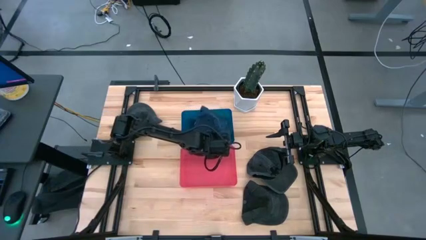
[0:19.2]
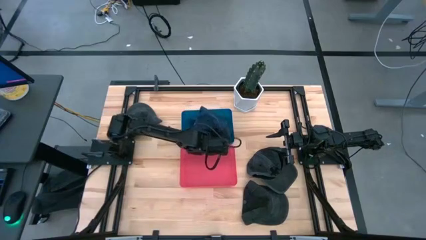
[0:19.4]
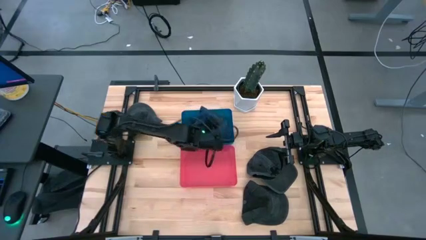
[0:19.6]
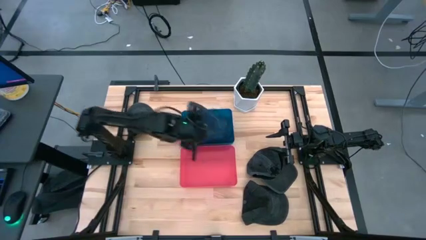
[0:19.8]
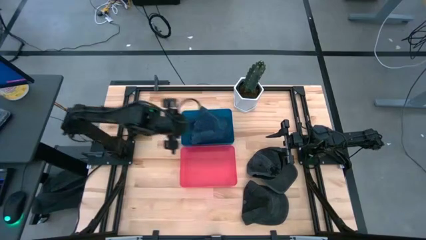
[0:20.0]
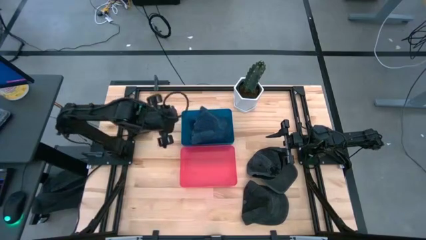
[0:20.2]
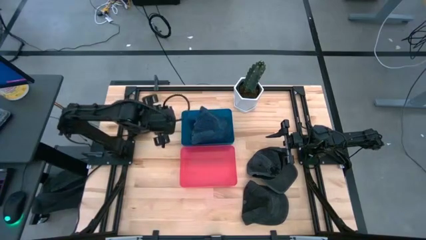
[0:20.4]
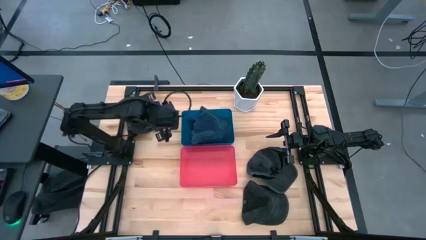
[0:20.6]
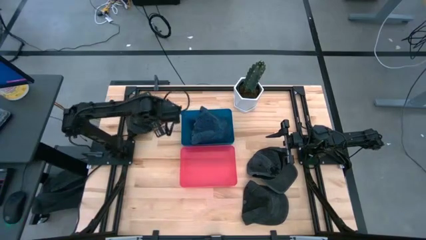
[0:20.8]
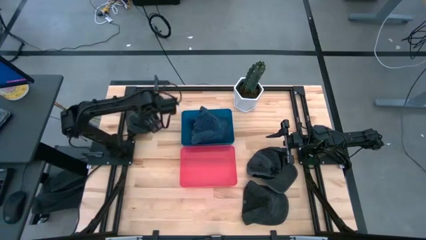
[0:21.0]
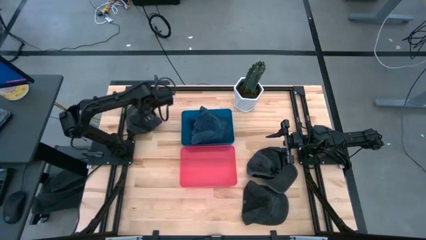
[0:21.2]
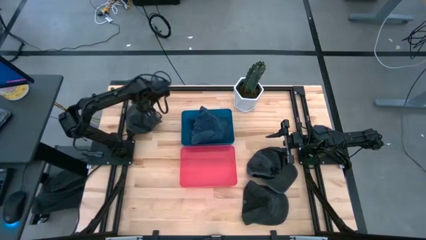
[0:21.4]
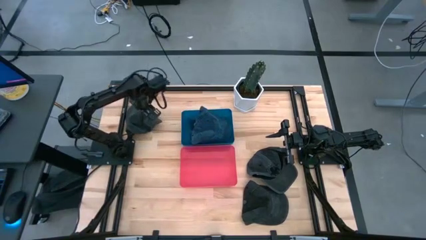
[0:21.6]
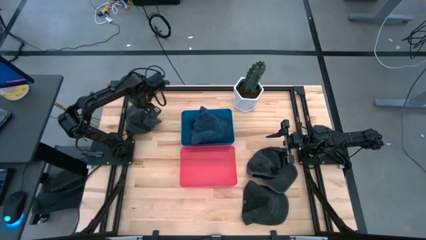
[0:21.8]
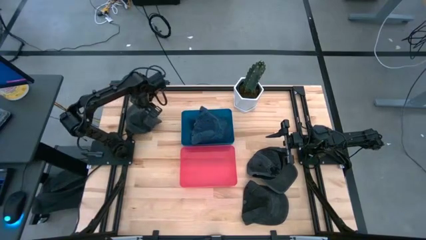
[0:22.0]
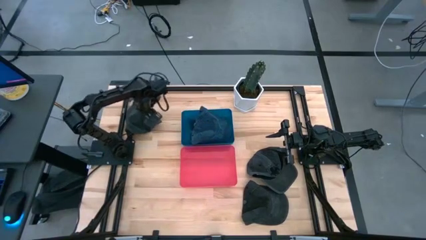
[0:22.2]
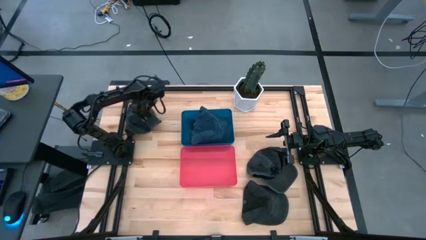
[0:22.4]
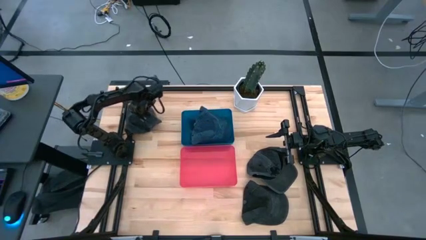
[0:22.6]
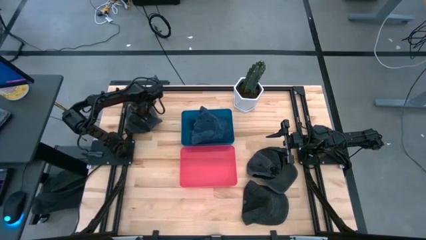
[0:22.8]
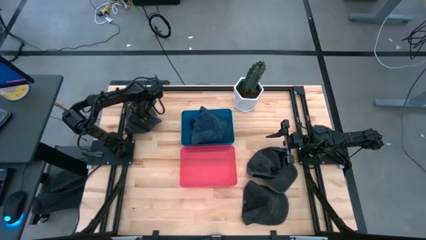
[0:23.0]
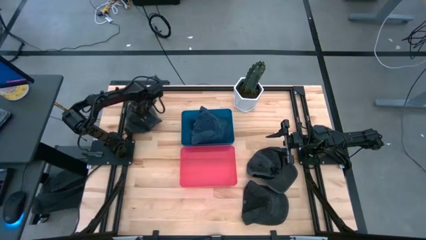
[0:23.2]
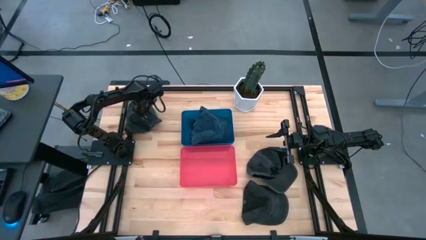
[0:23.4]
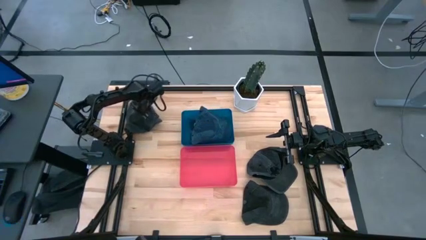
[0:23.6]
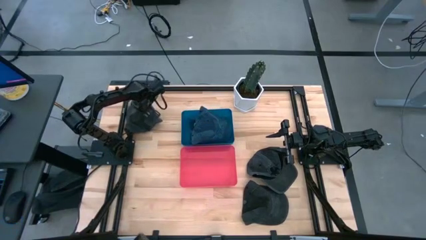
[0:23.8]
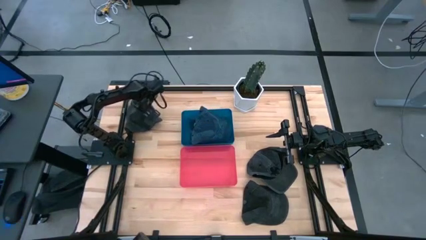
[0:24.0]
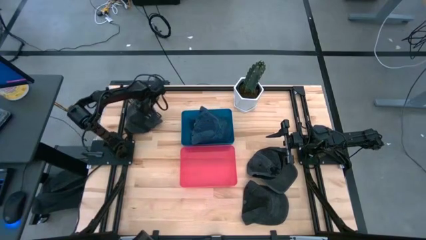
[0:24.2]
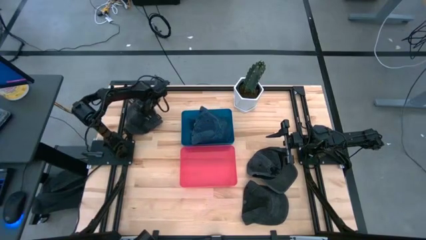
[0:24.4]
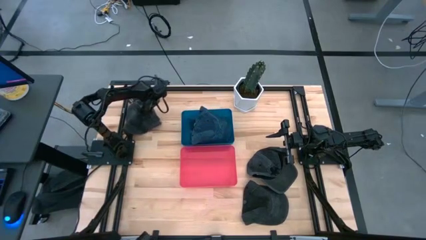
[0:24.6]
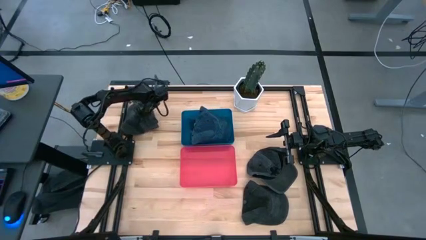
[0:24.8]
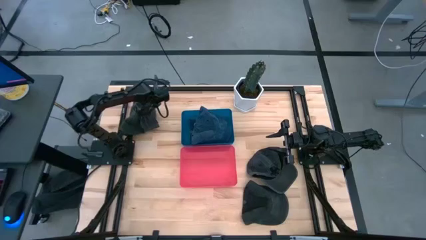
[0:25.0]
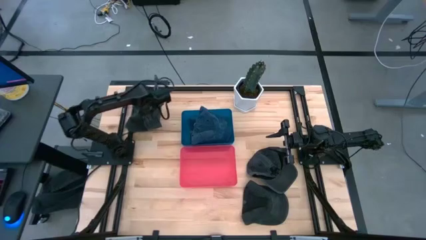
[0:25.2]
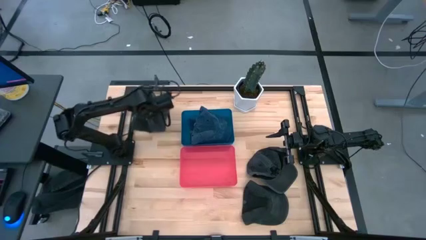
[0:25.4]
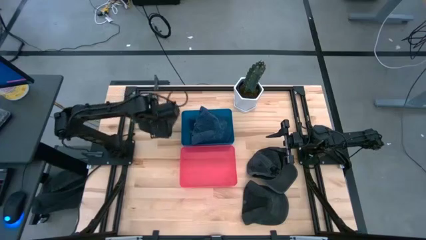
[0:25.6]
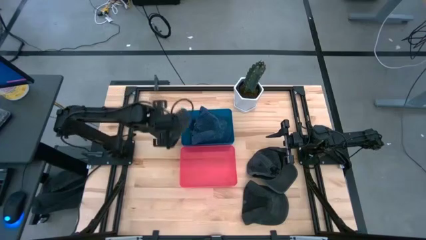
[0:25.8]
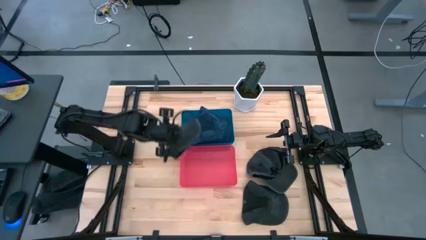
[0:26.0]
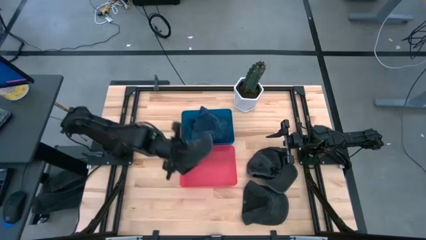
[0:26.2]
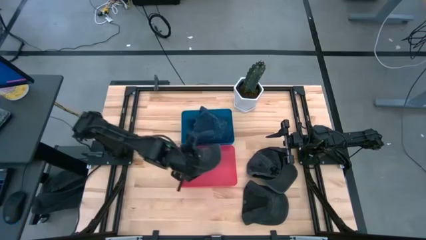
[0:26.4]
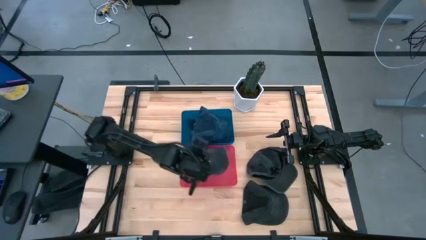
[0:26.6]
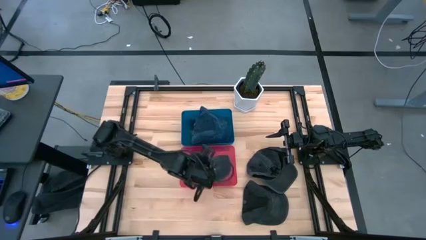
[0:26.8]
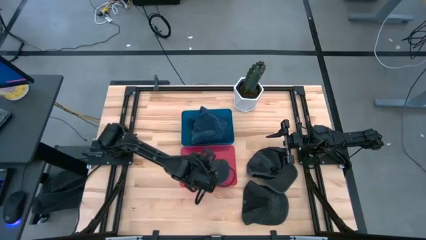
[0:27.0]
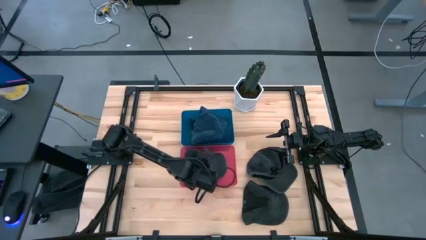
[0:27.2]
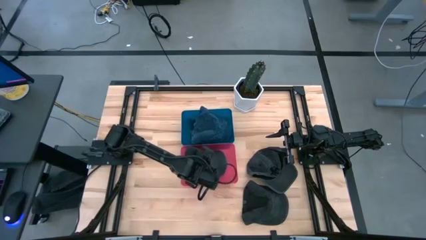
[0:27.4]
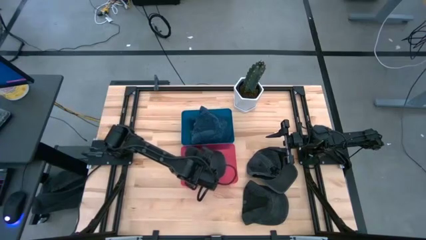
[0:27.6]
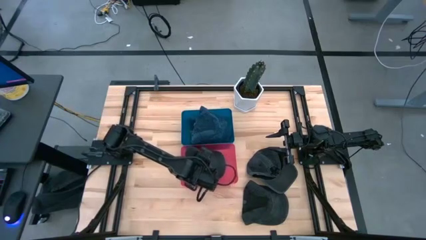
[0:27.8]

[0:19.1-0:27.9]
Task: Pick & Place hat
Put the top black cap into the pink bin

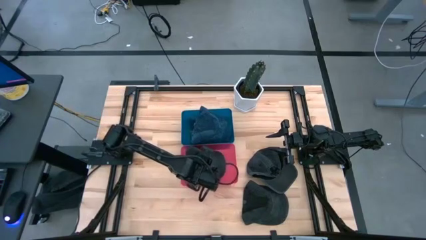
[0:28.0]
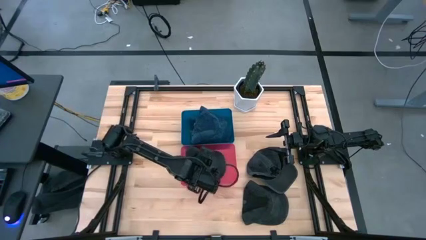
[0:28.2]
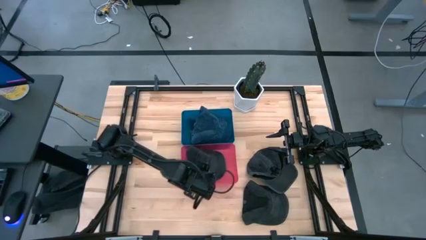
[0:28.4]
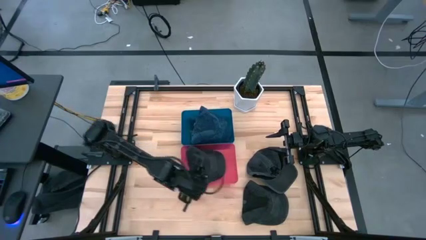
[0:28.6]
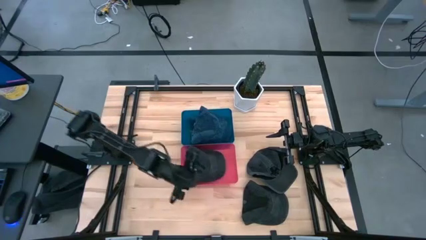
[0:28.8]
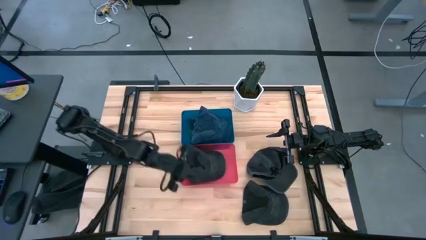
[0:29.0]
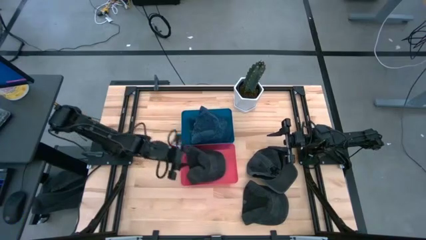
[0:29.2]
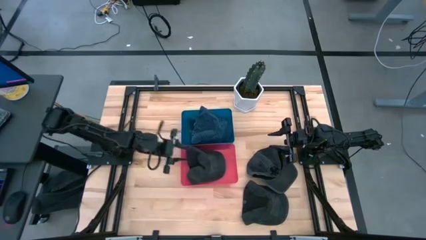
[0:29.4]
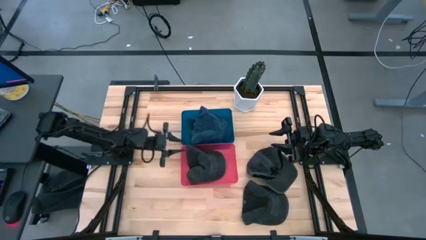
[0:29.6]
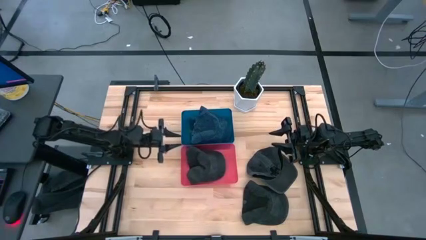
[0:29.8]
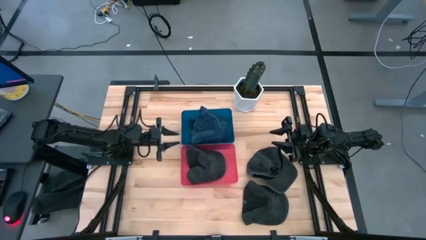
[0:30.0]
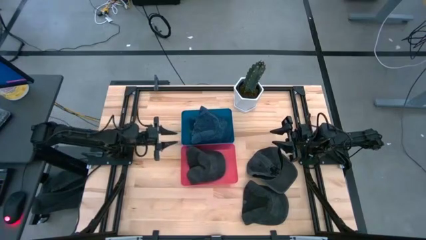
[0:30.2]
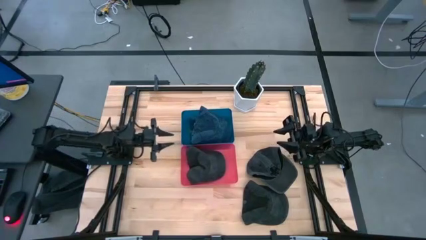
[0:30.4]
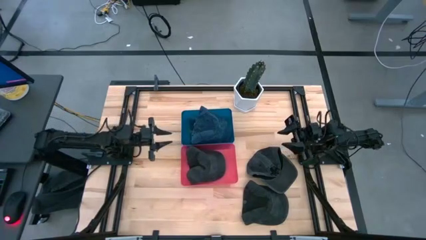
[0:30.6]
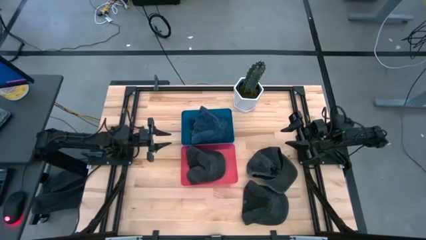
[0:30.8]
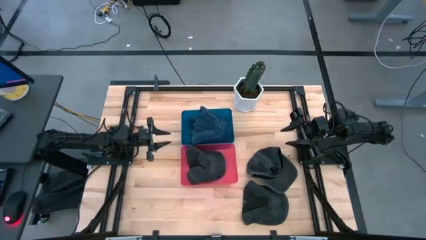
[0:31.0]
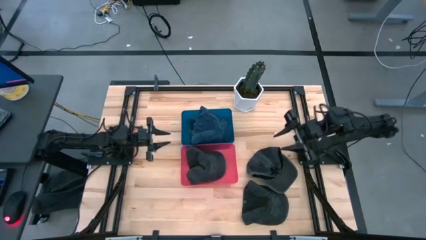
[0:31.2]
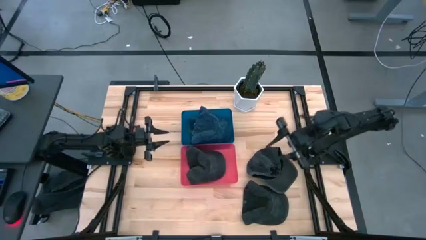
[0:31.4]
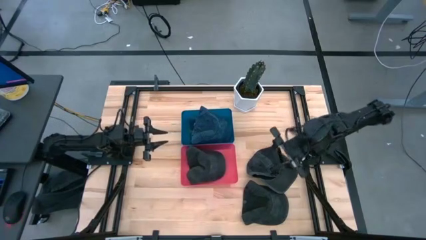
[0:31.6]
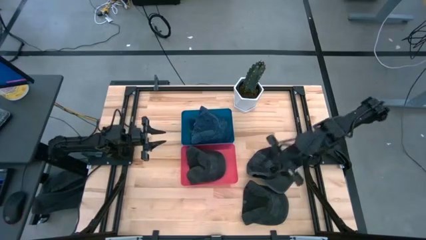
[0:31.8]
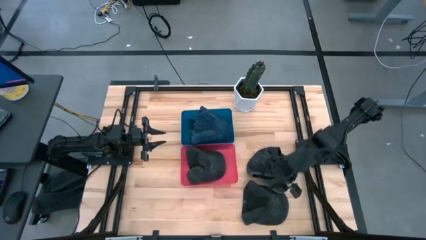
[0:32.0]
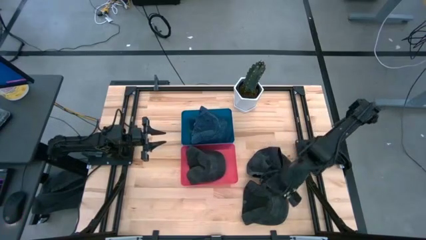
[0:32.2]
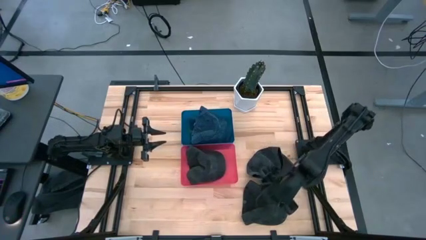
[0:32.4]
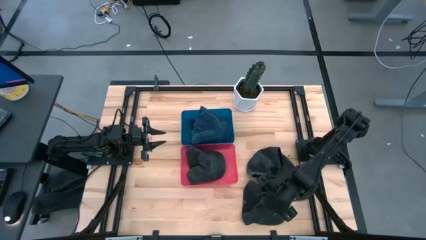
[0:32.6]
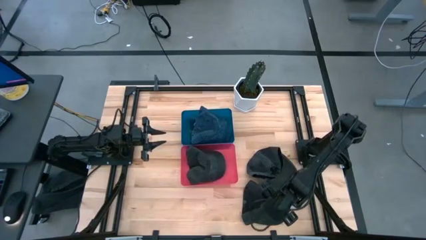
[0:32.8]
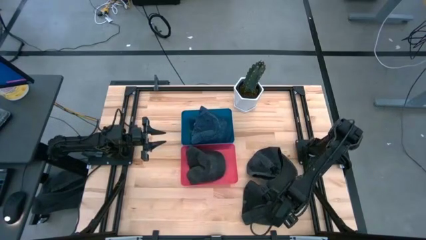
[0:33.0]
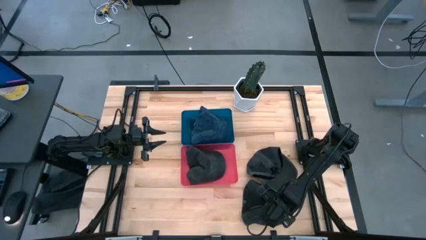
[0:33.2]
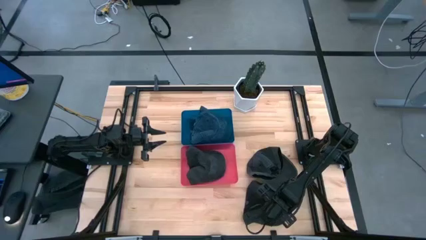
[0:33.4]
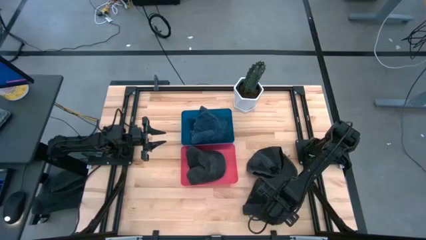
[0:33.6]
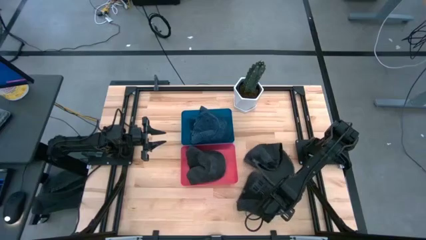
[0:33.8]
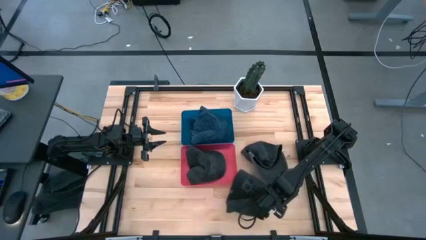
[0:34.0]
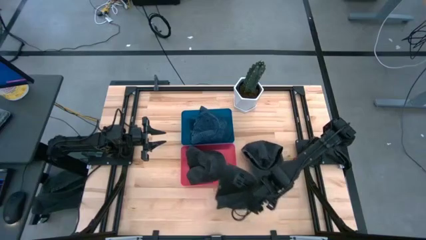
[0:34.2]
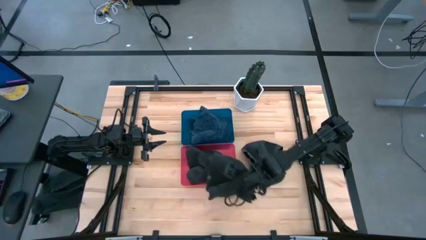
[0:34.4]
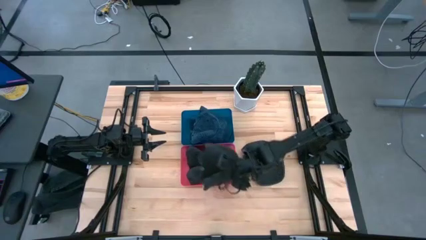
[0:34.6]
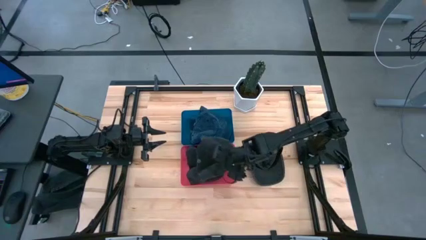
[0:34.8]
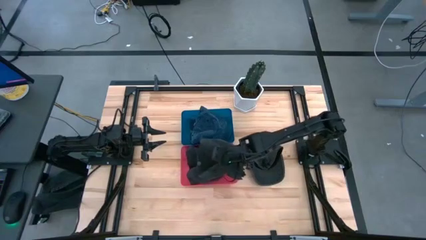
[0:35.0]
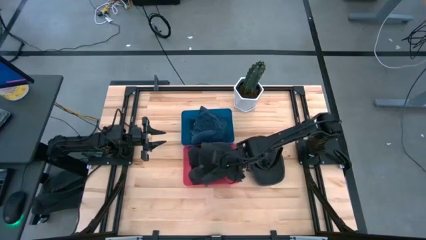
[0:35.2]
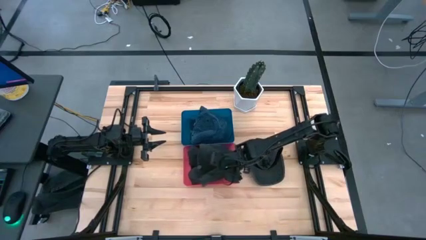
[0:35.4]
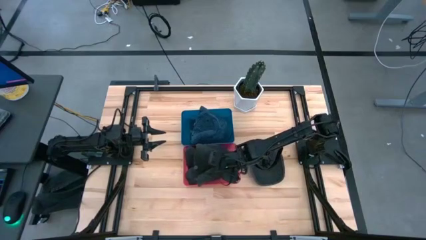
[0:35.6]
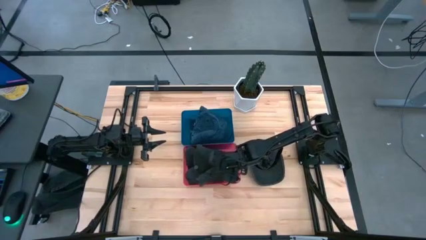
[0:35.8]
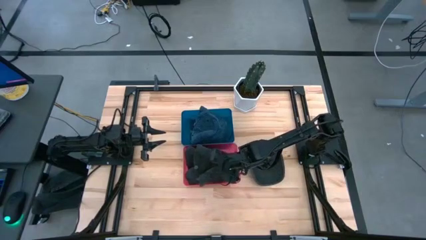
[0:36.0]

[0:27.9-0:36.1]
Put the bottom black cap into the pink bin
